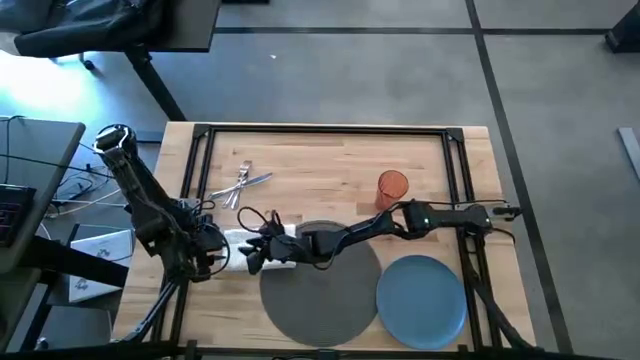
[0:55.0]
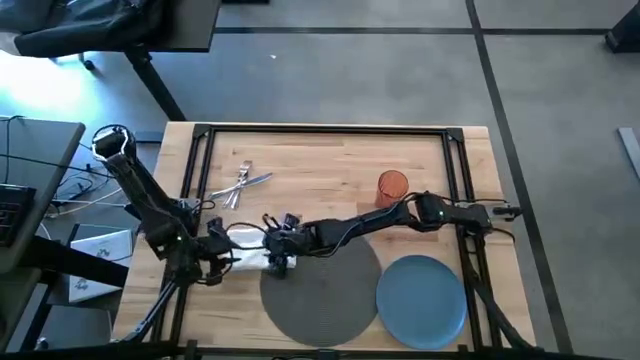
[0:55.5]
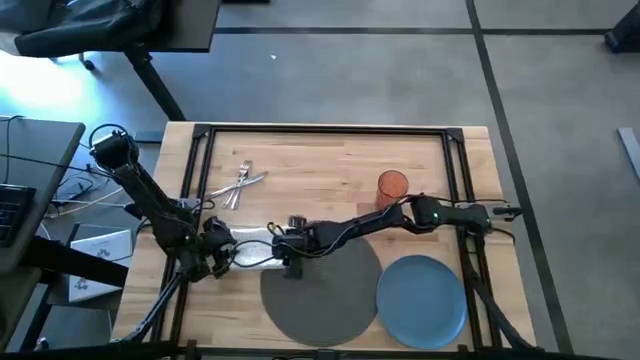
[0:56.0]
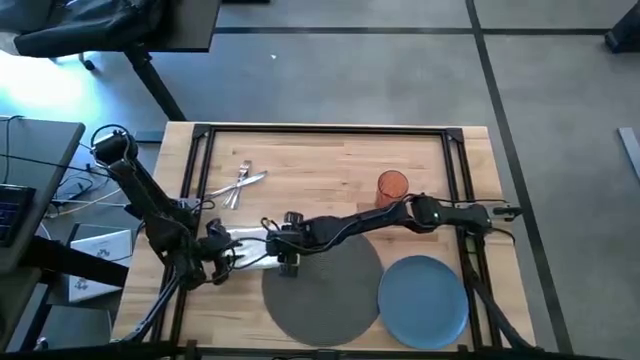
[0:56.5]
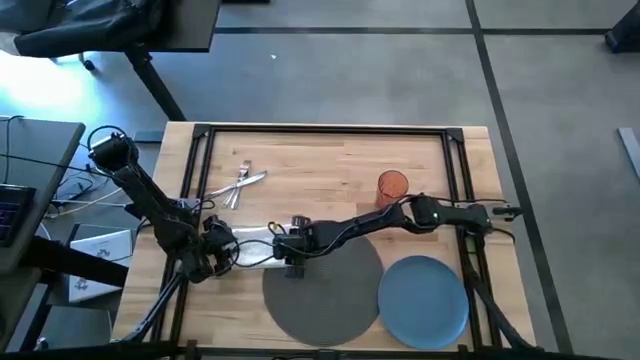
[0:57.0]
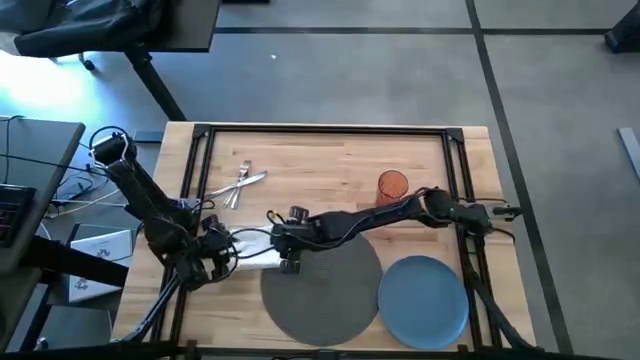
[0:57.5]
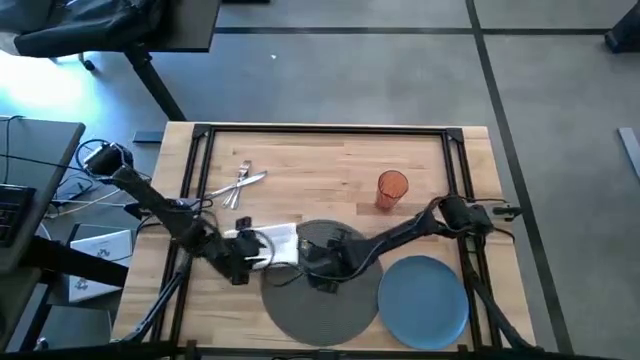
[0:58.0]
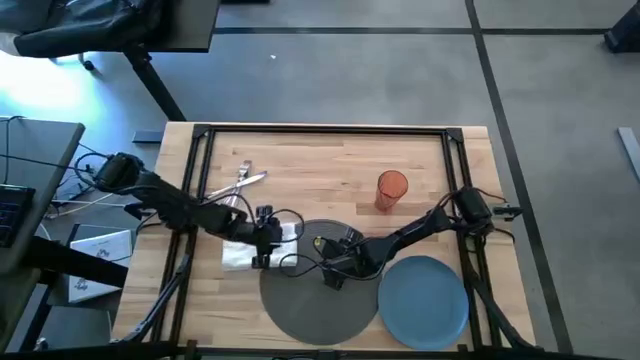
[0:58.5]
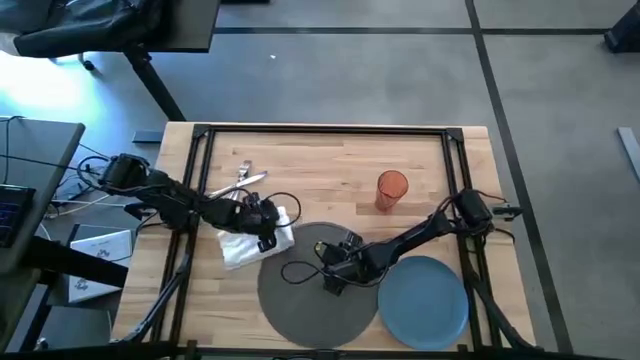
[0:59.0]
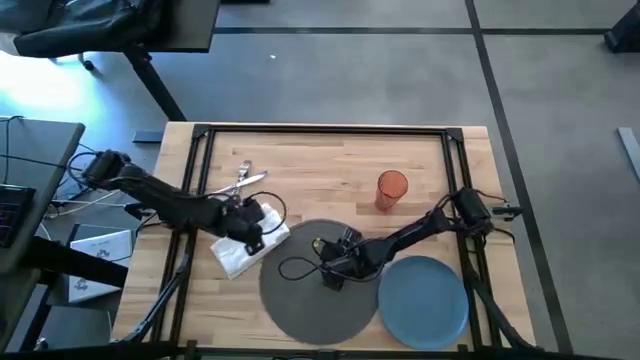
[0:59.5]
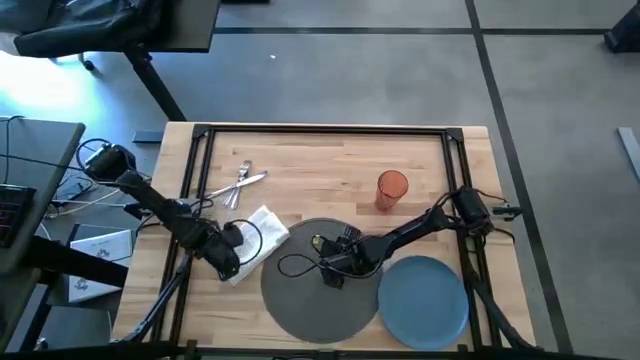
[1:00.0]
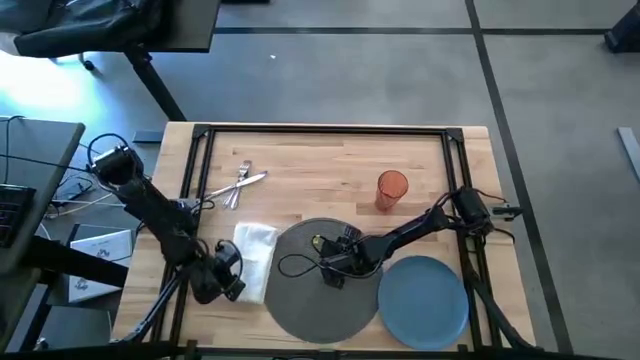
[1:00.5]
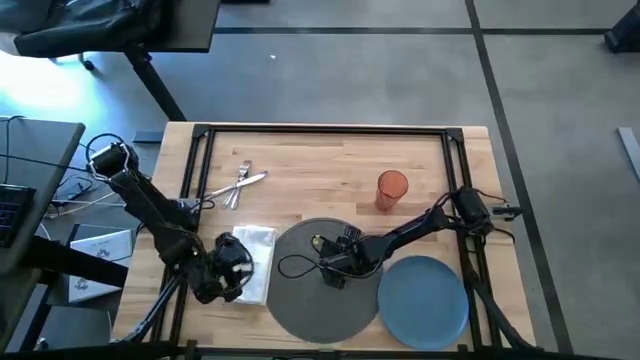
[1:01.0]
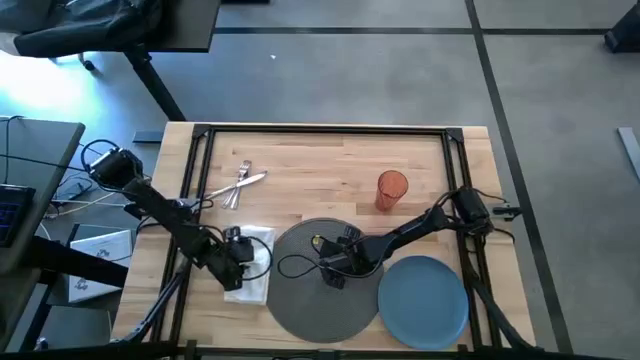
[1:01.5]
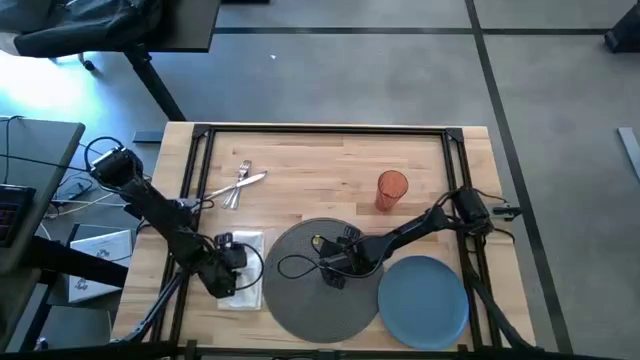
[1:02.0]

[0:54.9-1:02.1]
Task: Set table place
Put the white table napkin to the left of the gray table mat

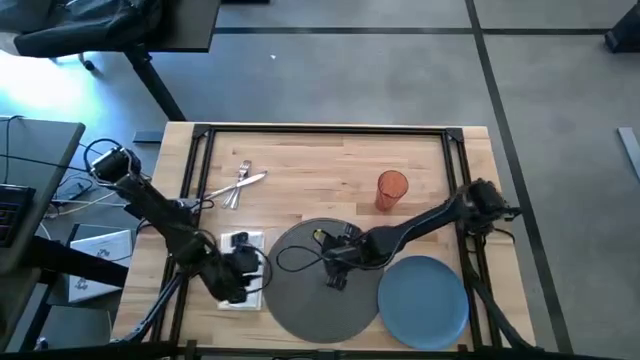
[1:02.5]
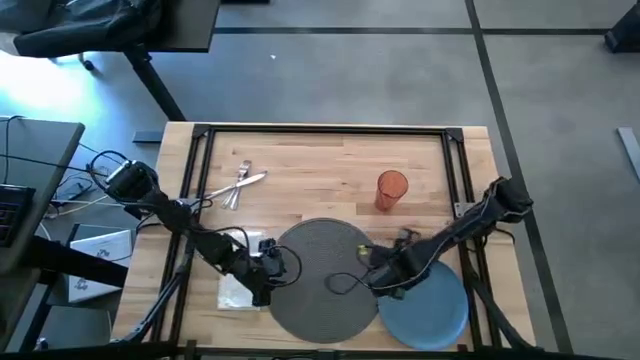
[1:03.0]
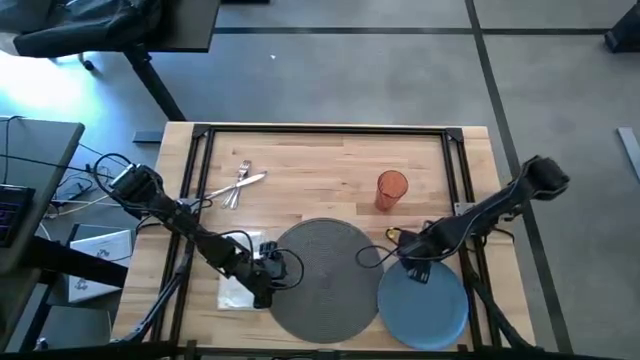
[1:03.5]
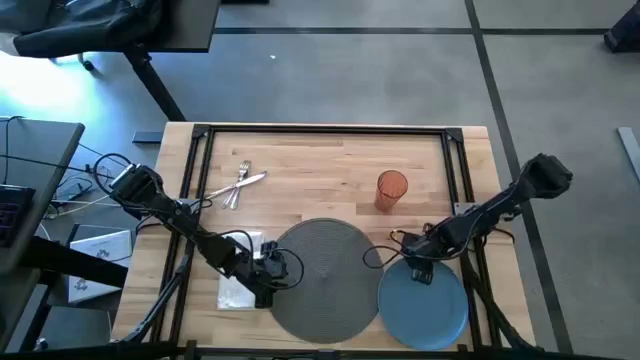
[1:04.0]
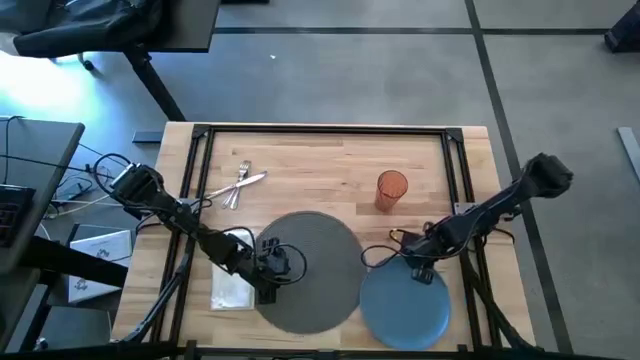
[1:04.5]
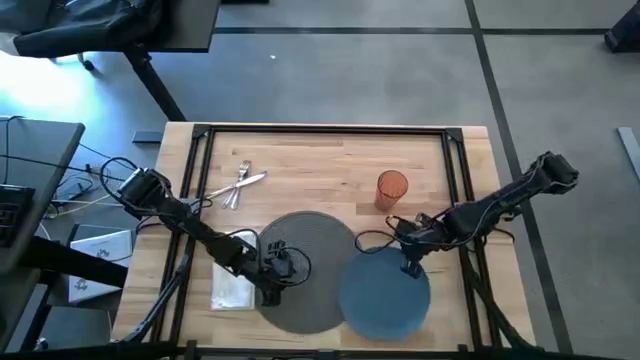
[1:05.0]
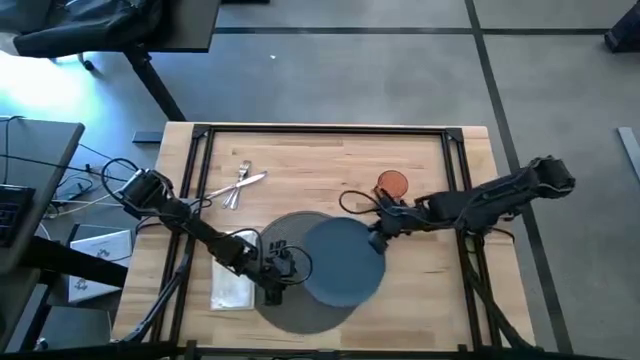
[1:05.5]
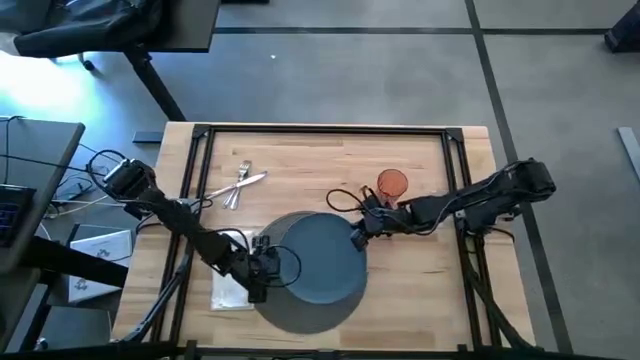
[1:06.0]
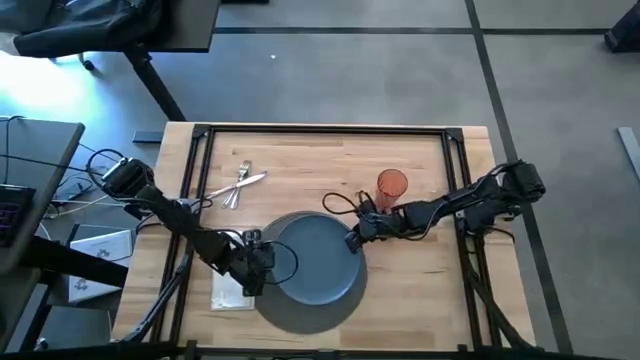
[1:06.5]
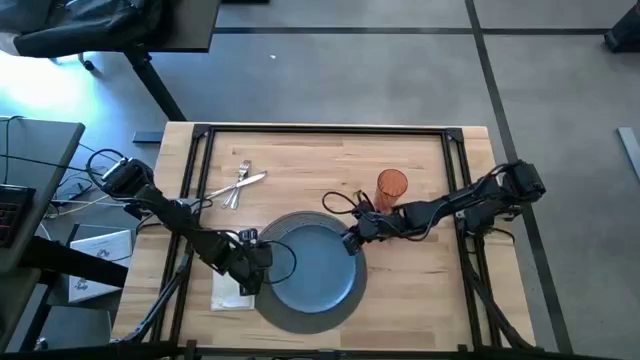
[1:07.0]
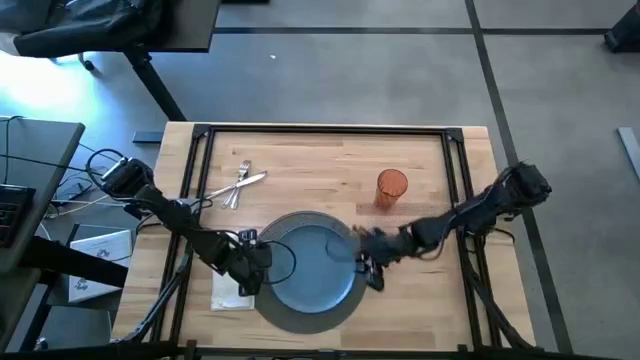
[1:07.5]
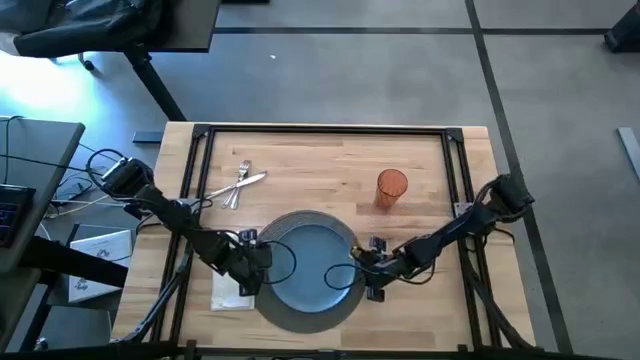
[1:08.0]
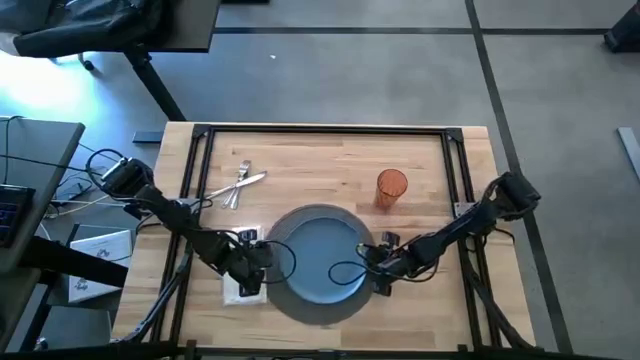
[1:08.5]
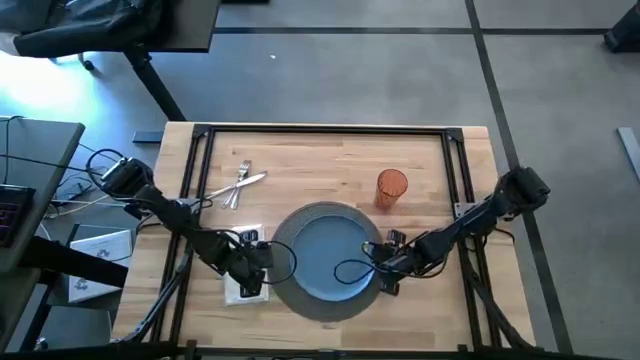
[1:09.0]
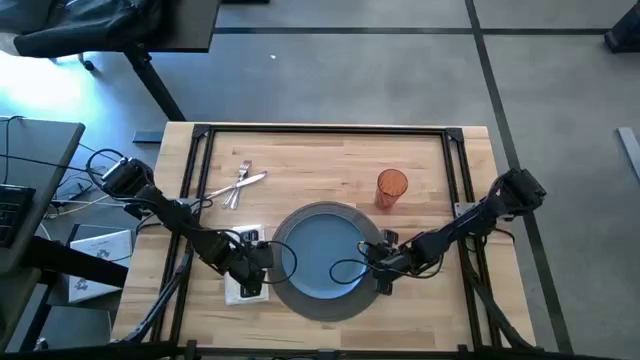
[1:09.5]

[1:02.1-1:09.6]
Put the blue plate on the gray table mat

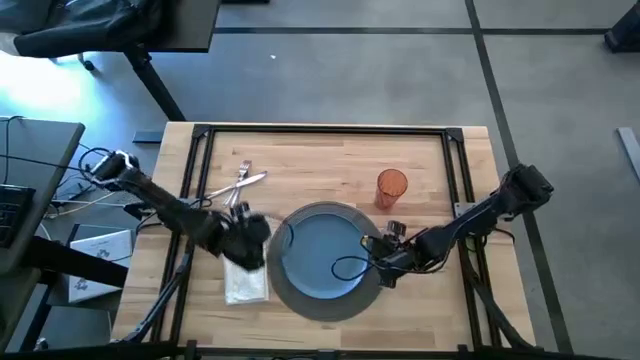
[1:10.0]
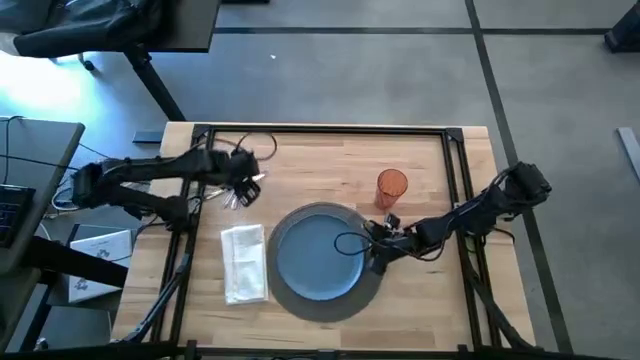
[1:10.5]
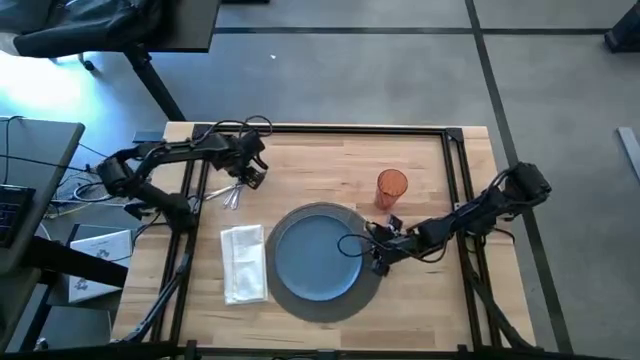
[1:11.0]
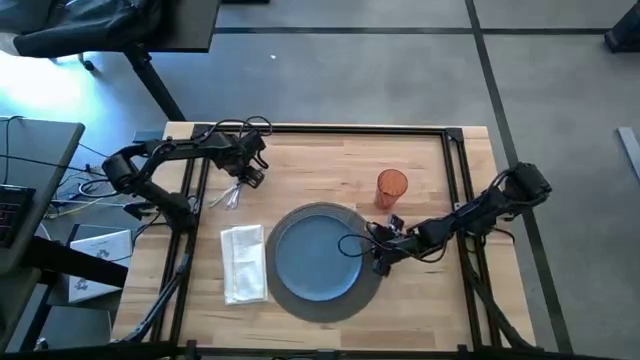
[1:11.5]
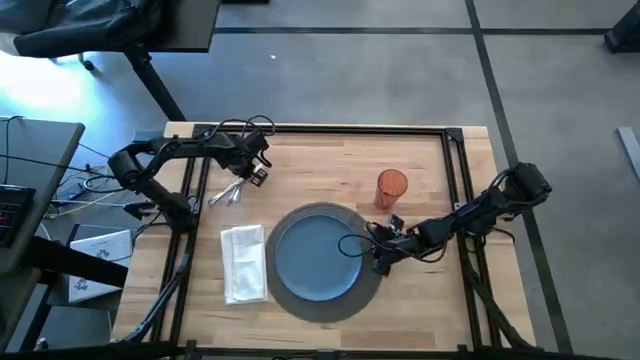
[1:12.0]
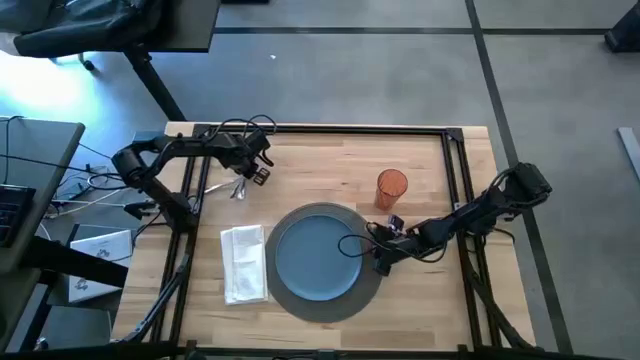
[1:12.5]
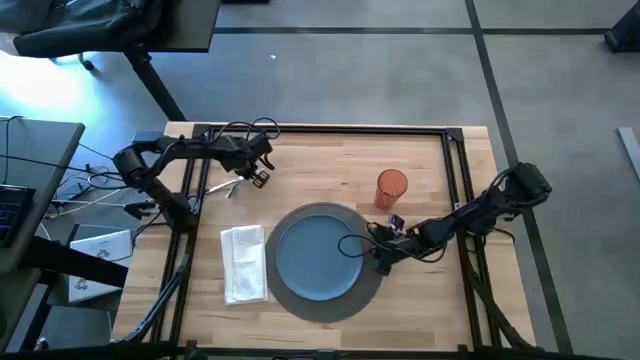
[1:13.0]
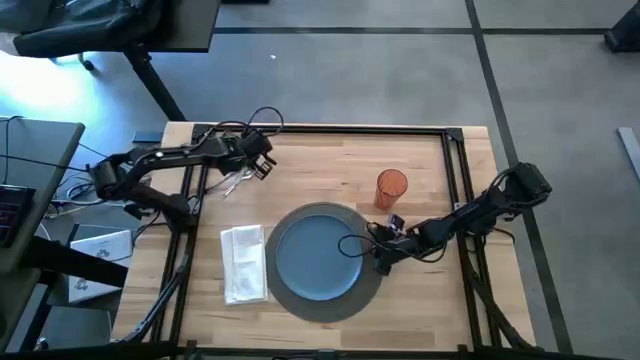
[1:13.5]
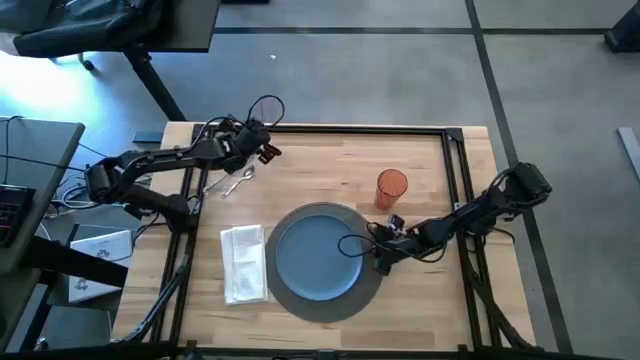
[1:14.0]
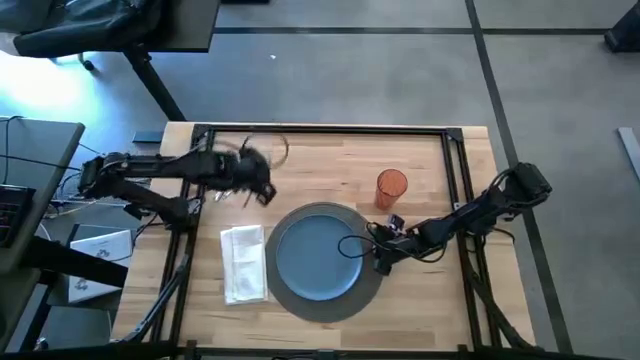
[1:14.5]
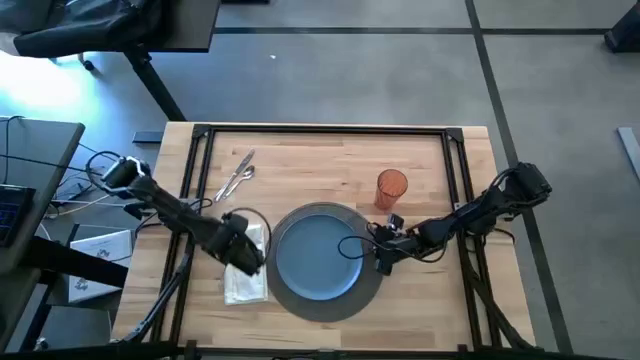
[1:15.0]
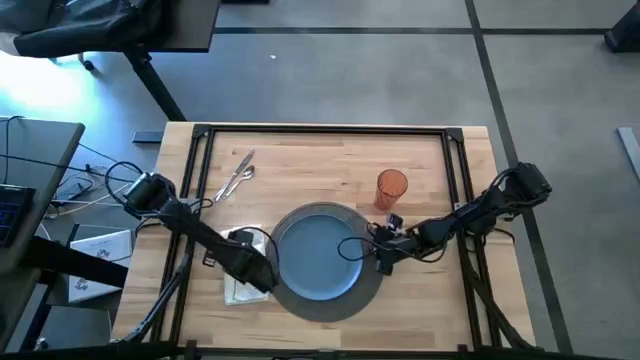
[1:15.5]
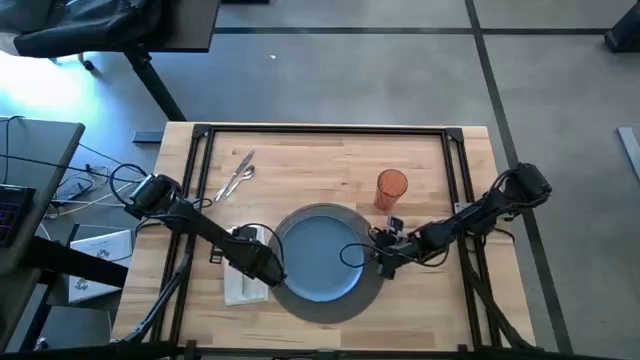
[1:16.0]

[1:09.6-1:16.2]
Put the silver fork on the white table napkin

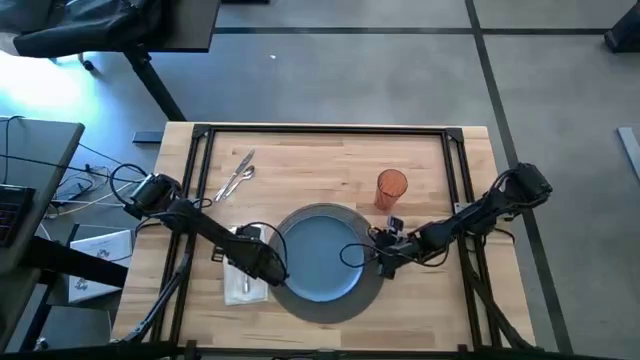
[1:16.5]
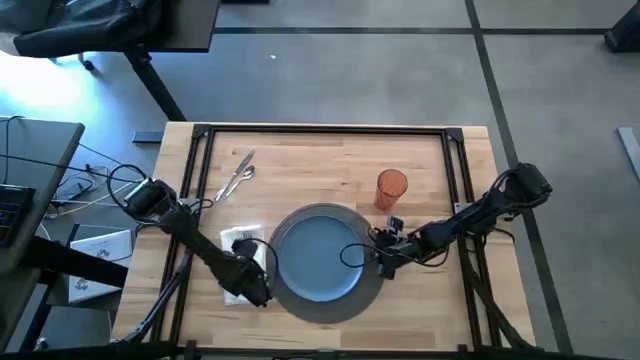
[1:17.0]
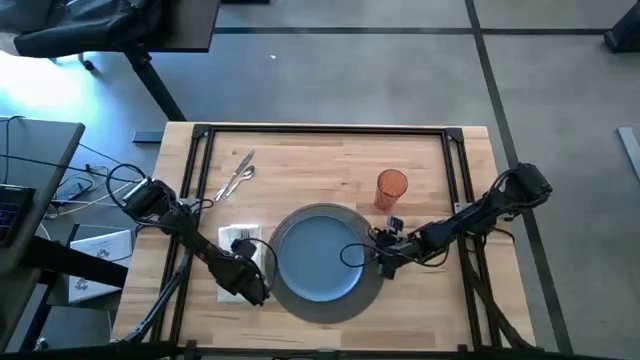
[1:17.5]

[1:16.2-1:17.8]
Adjust the white table napkin
